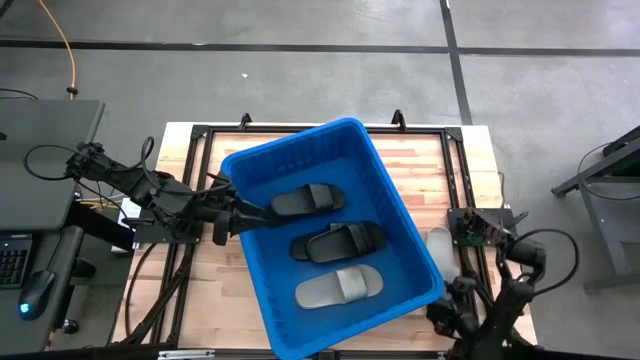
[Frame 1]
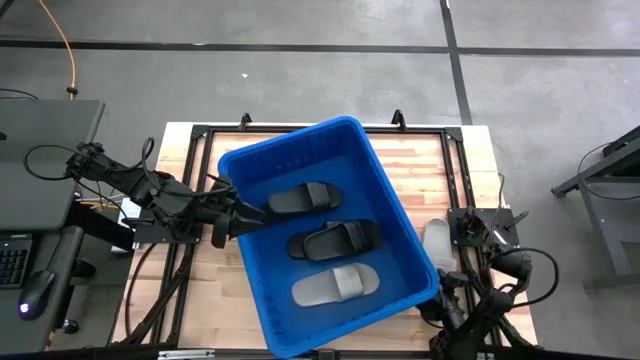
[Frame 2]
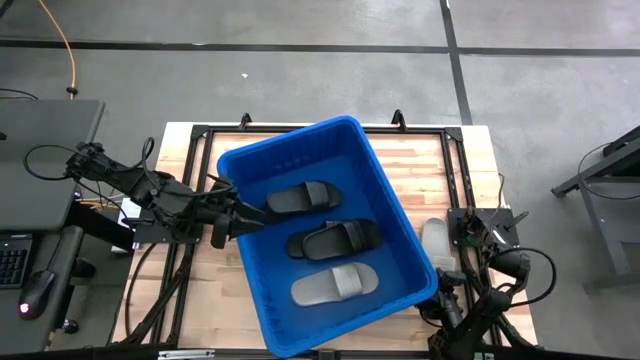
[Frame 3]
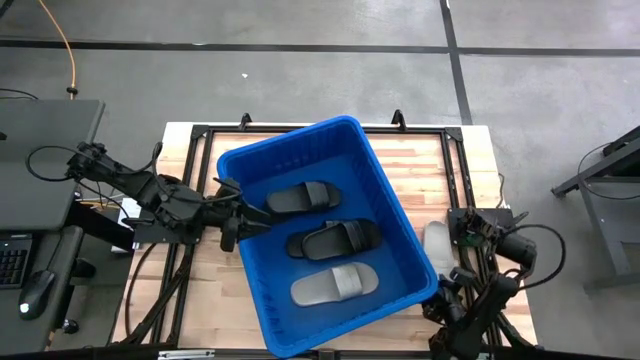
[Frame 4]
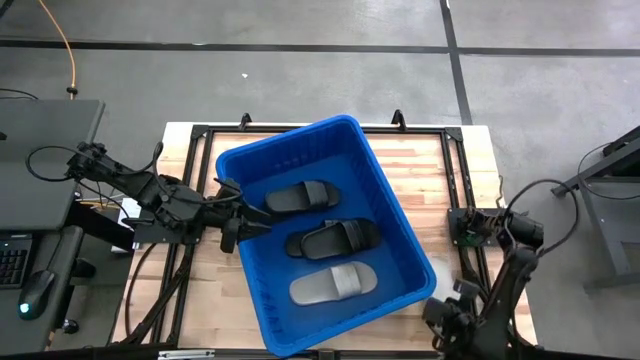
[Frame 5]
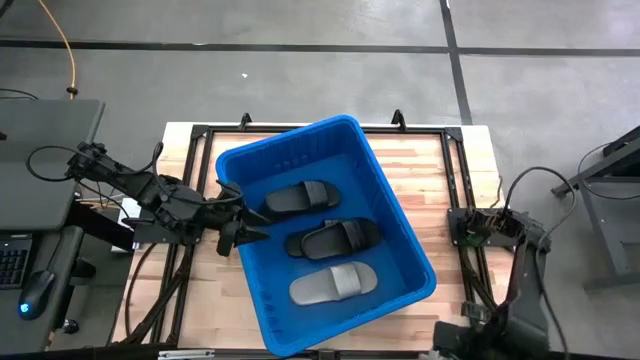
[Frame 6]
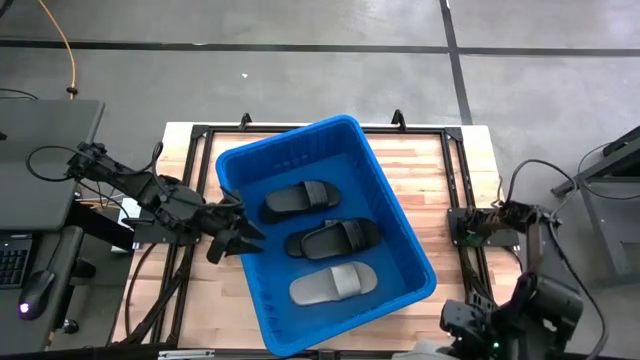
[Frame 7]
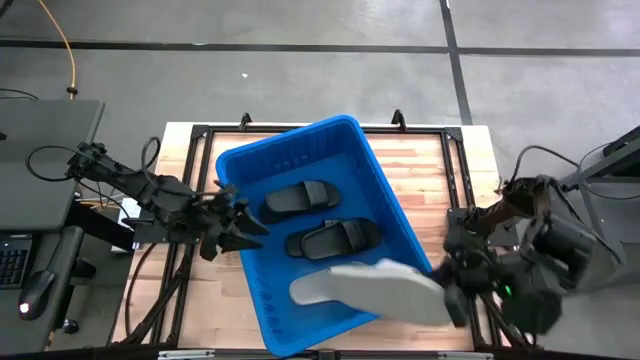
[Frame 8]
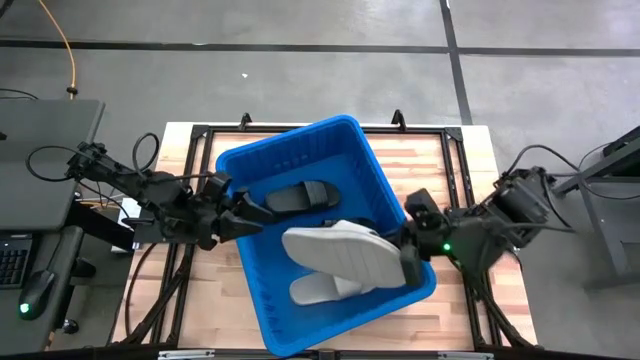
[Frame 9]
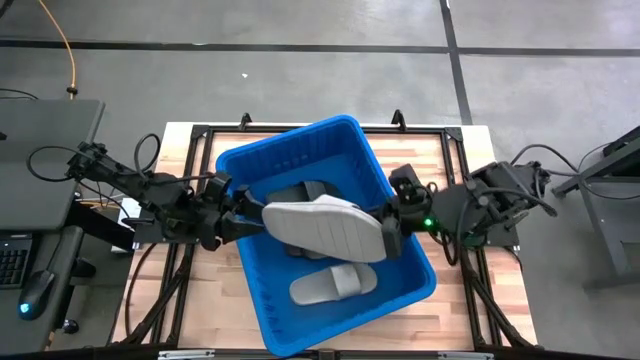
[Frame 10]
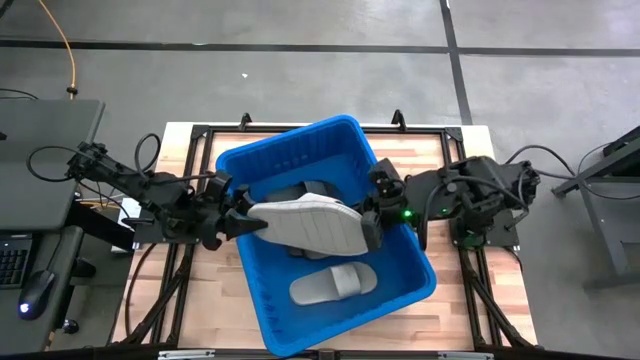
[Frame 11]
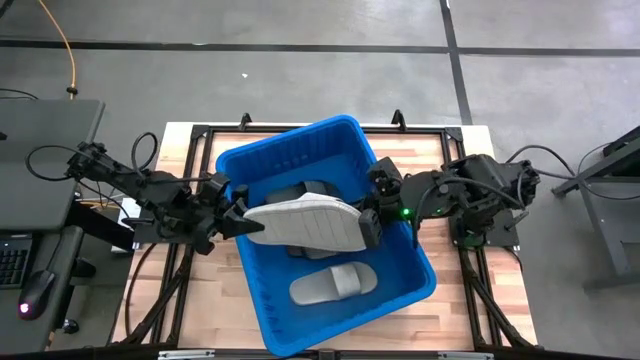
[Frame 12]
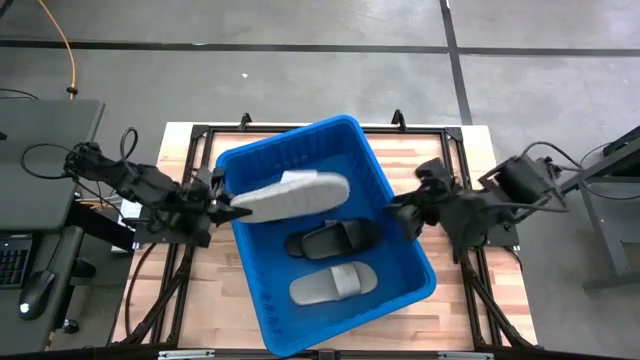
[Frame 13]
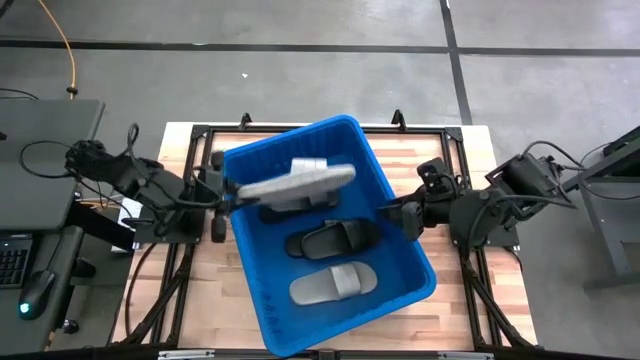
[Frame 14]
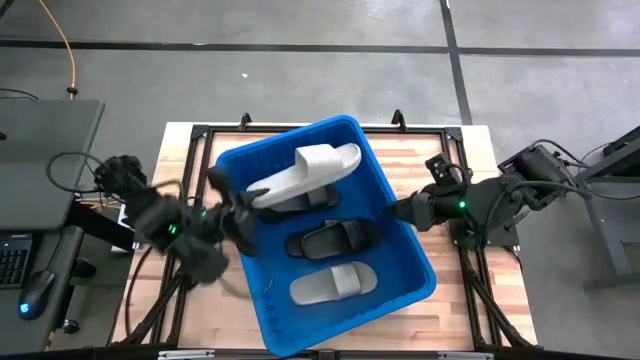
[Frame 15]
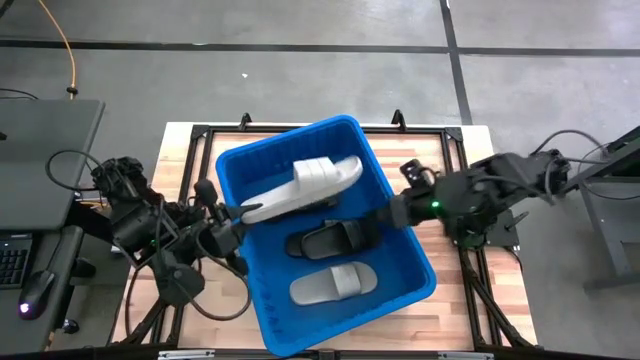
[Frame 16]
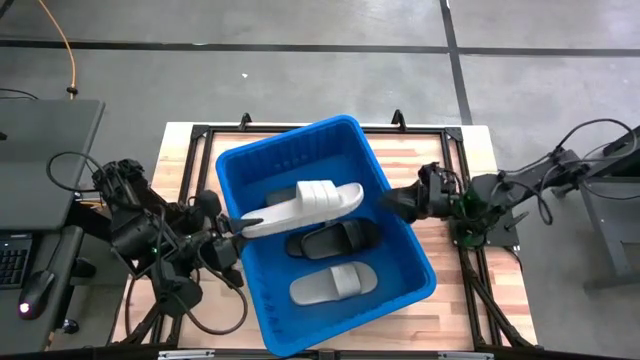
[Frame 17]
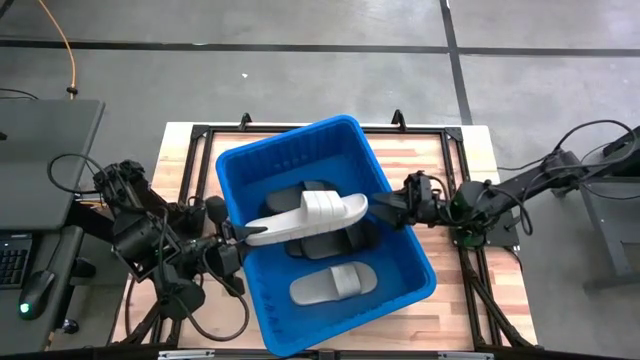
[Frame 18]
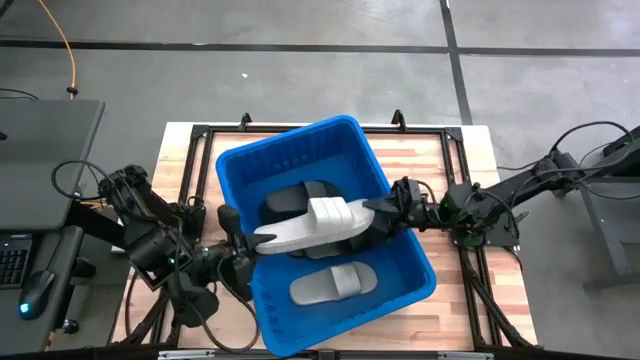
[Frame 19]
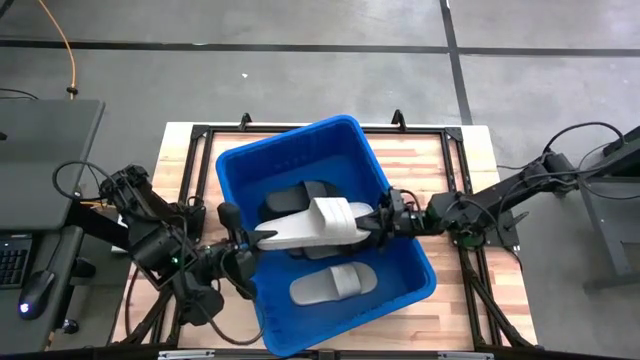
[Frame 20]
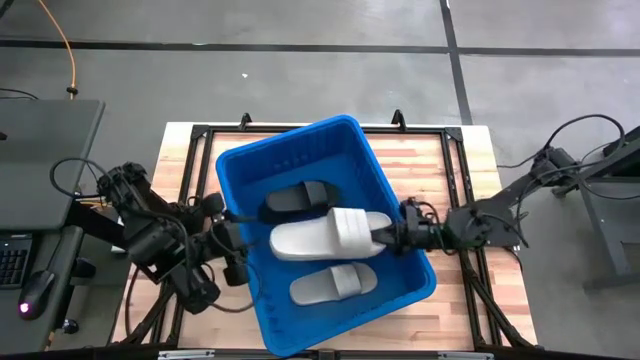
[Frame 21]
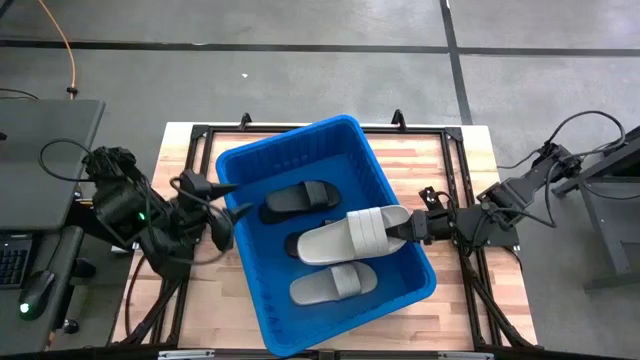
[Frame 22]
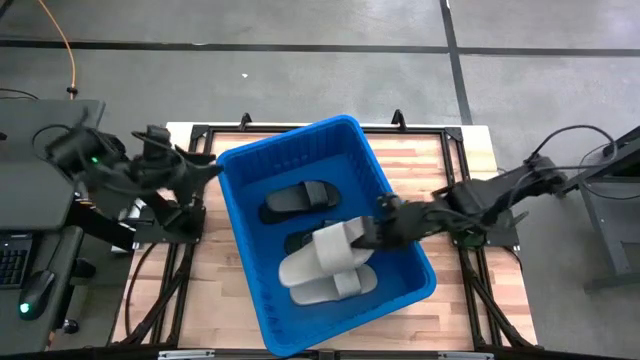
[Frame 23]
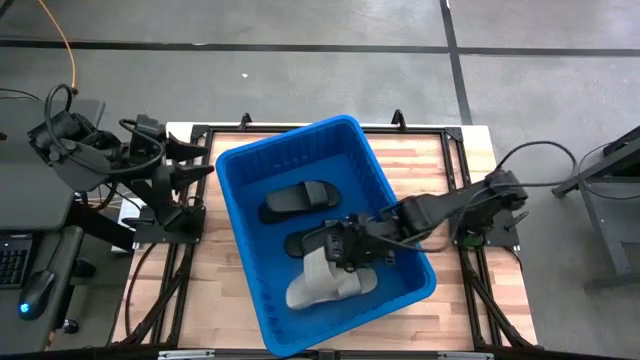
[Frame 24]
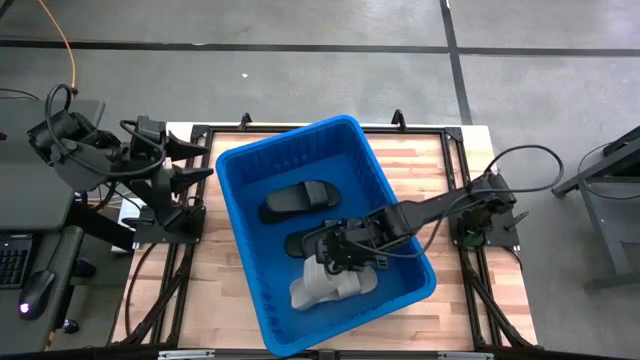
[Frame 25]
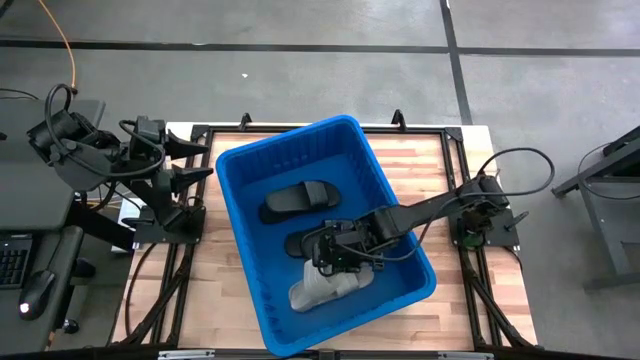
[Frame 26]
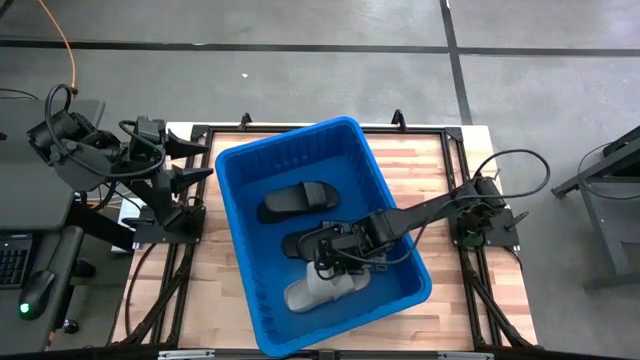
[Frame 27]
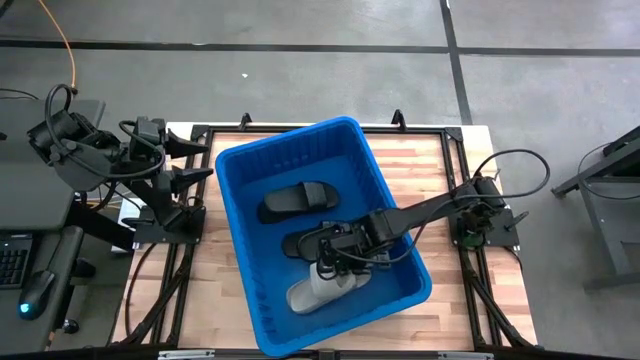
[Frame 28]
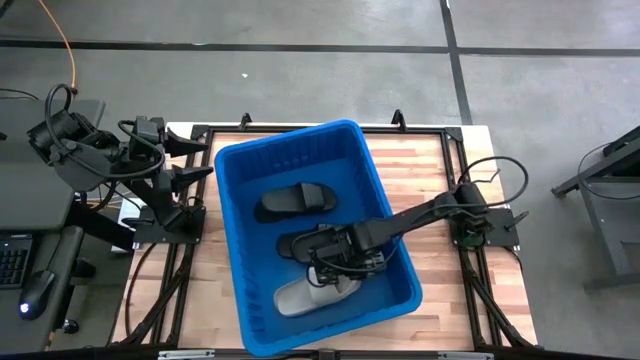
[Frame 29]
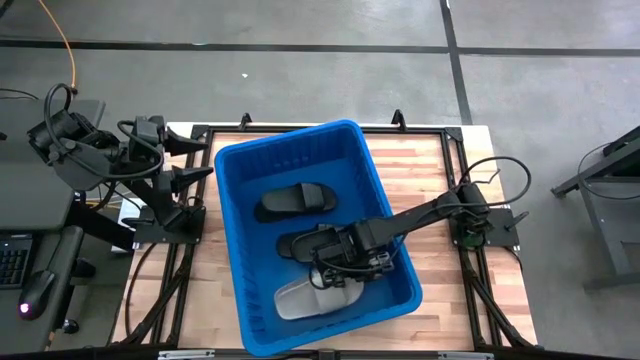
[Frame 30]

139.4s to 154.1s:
Task: Pick and place slides into bin
Put the white slide in the bin

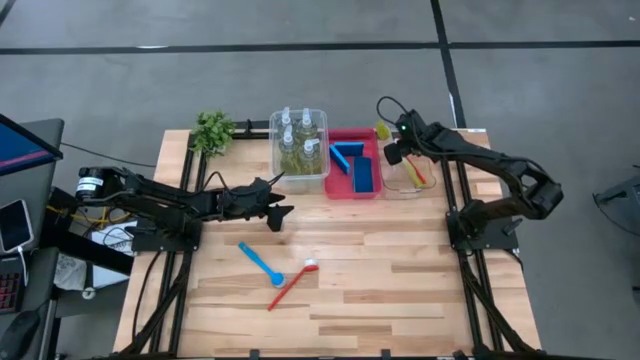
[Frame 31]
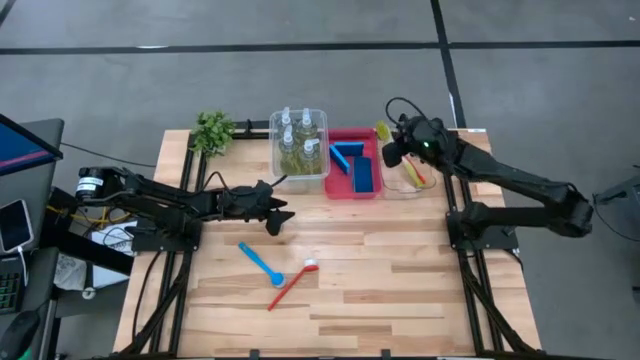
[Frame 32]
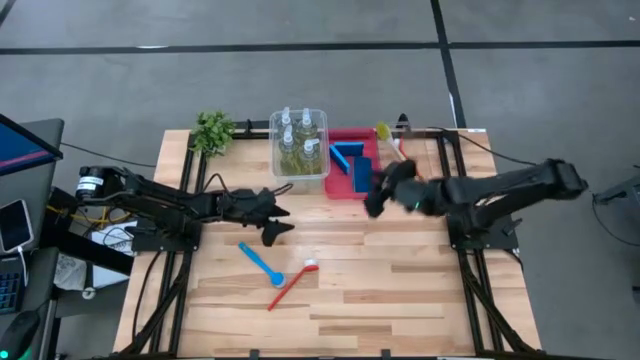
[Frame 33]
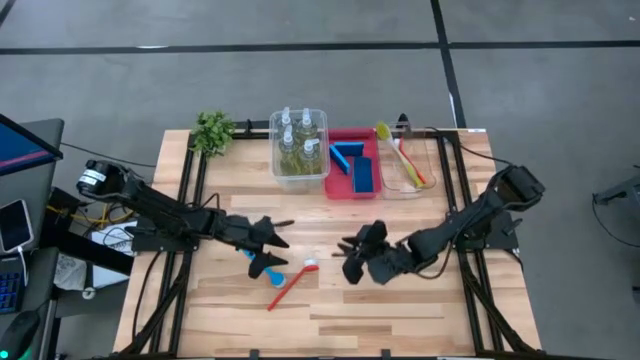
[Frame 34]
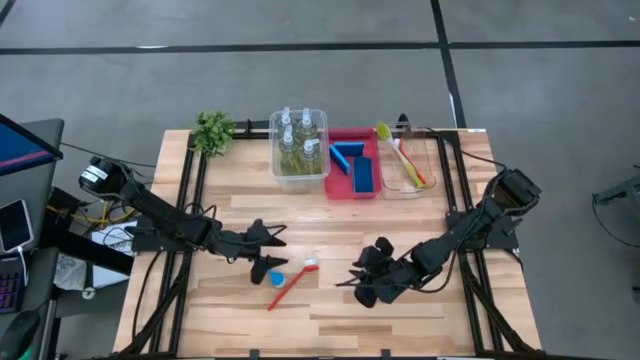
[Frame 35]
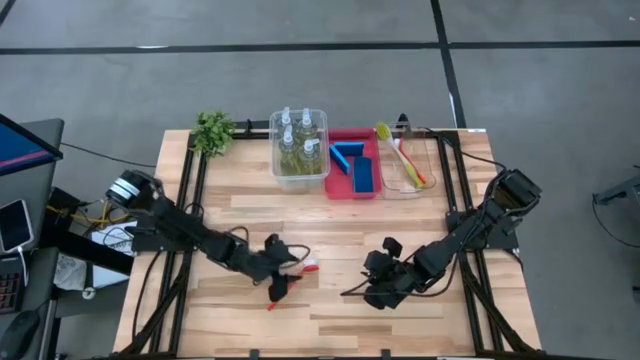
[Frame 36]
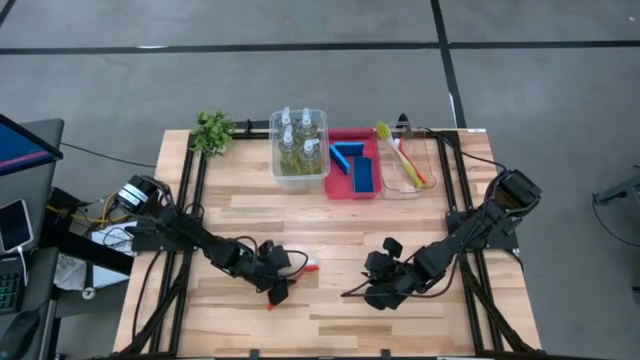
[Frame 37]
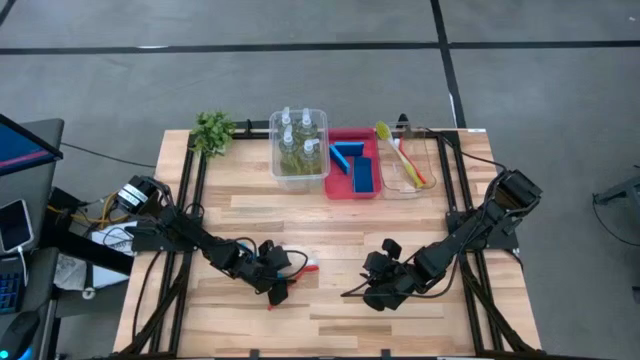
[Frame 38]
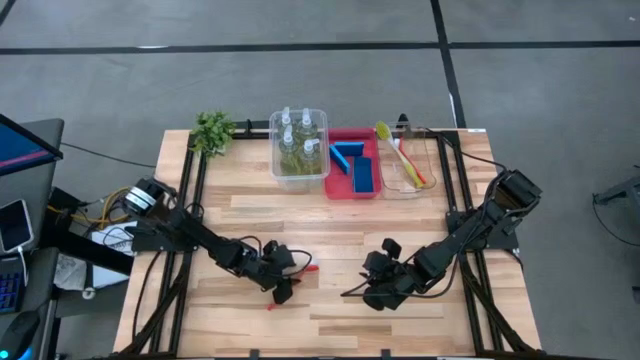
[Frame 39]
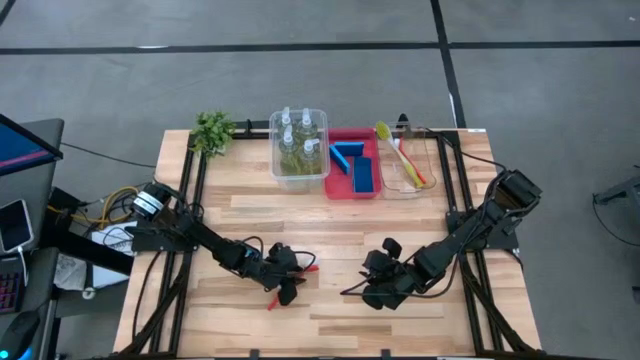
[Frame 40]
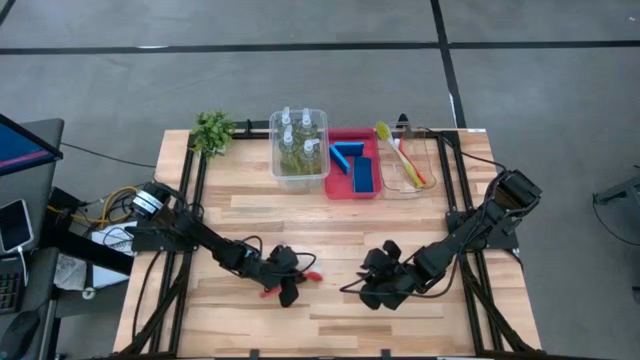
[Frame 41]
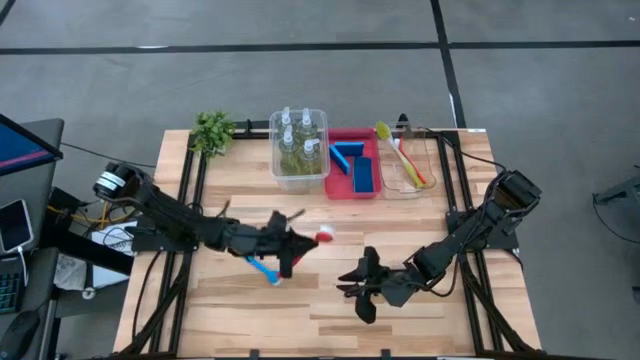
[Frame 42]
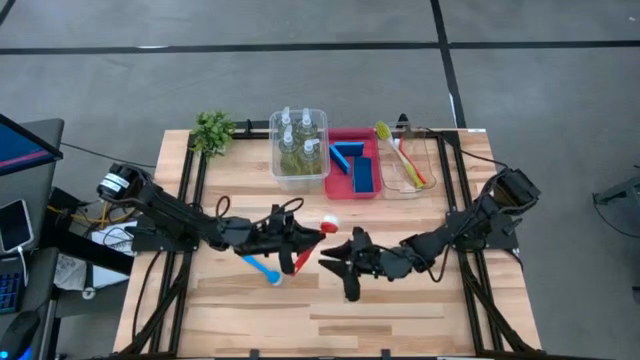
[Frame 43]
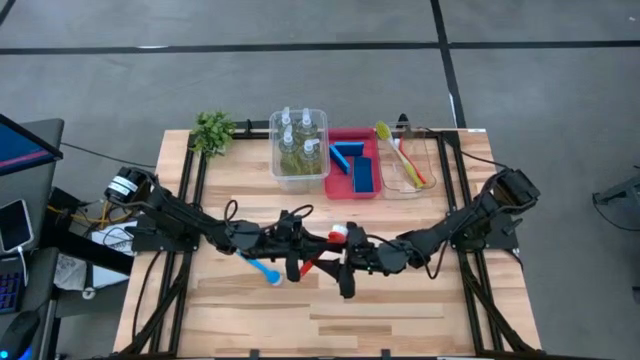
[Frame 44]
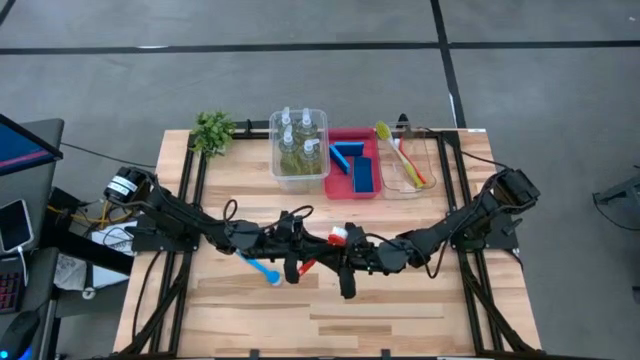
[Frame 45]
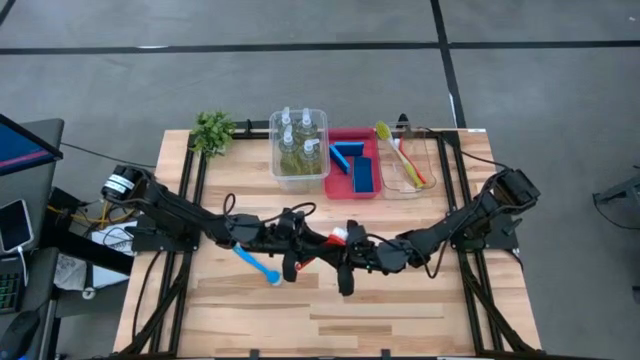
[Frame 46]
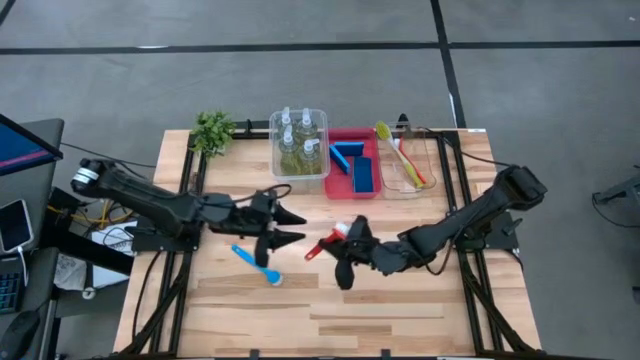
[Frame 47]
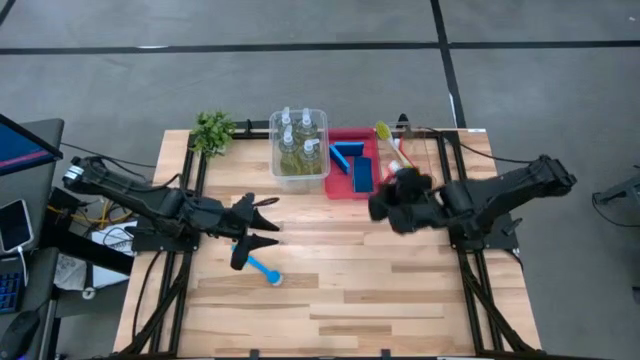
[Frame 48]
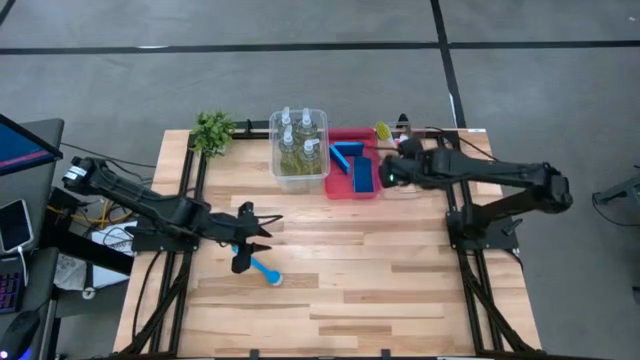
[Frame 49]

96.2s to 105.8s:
Task: Pick & Place Kitchen Sink Supplies
Put the red dish brush into the transparent bin
